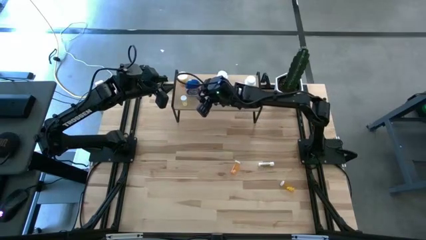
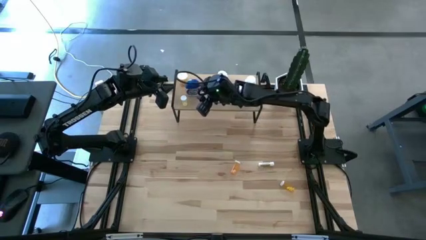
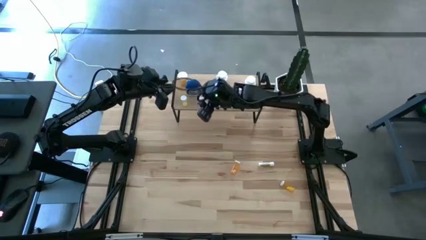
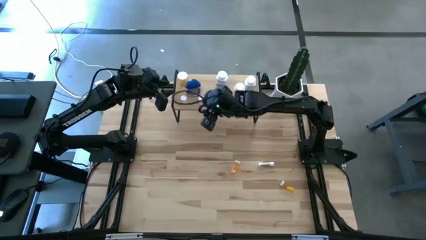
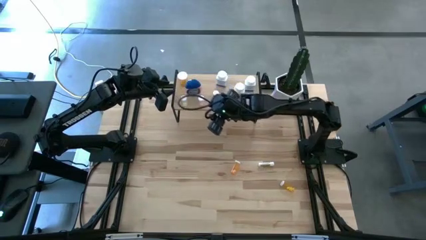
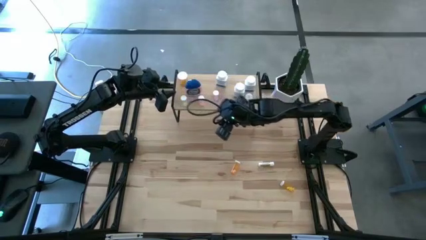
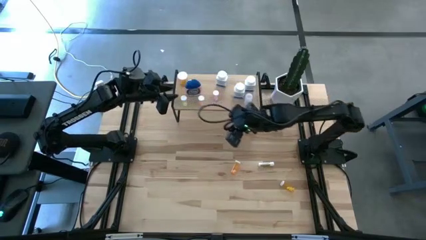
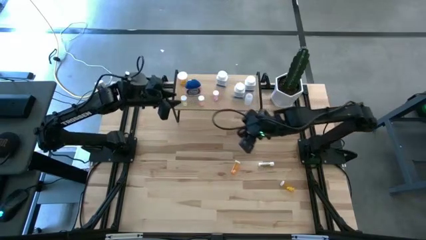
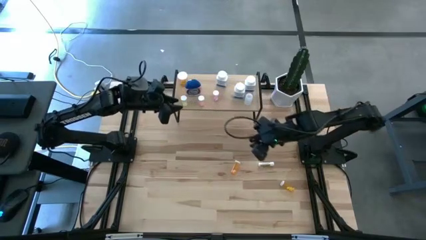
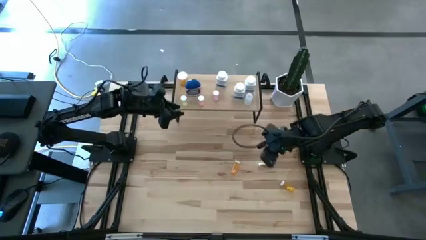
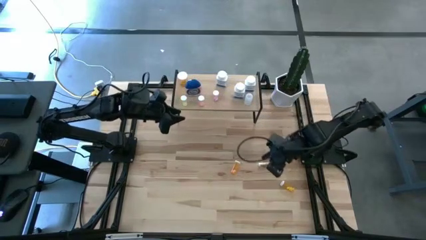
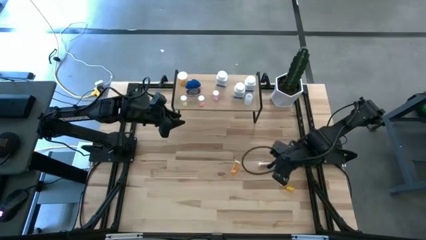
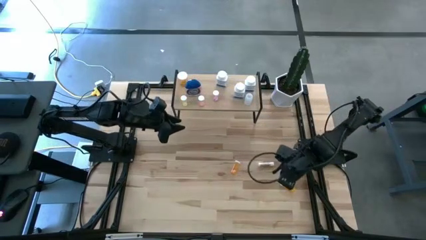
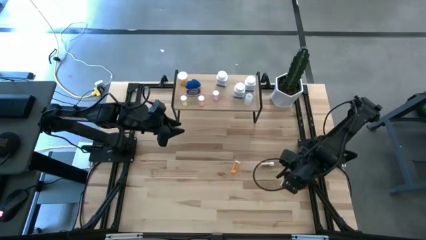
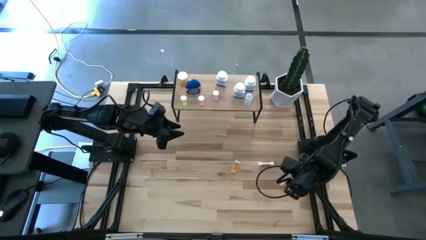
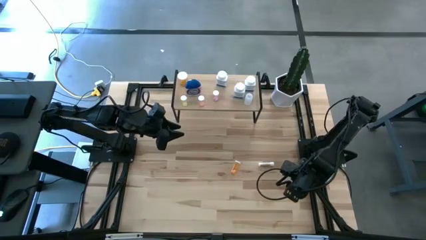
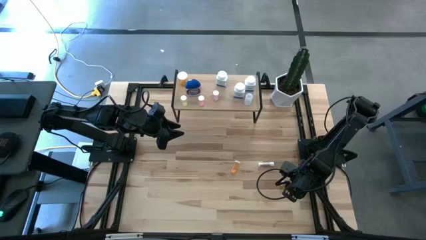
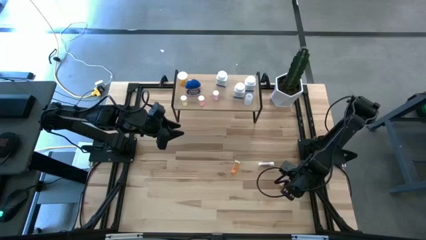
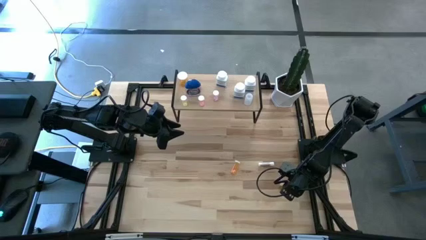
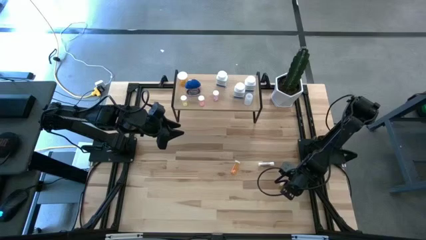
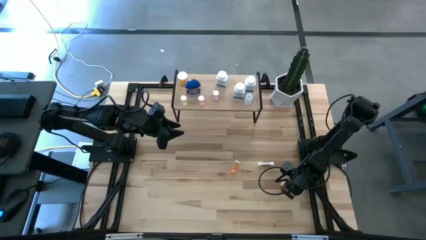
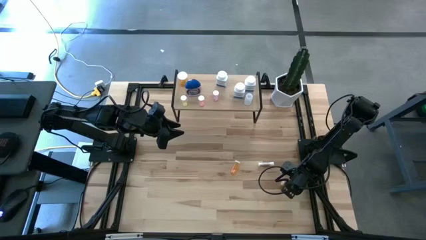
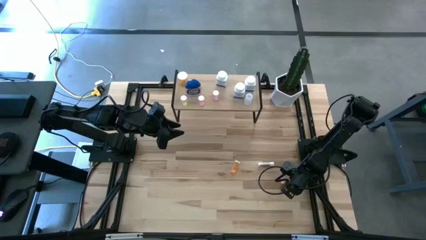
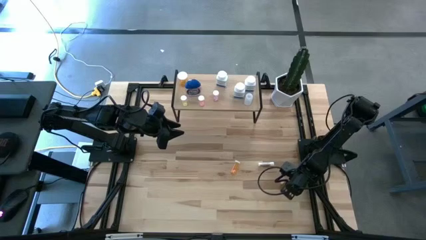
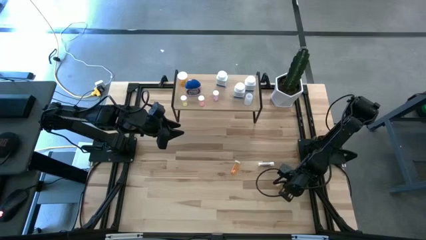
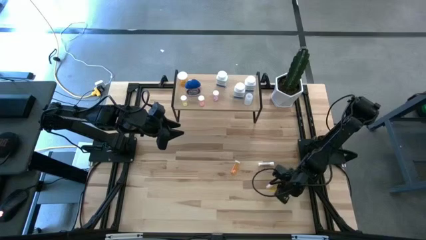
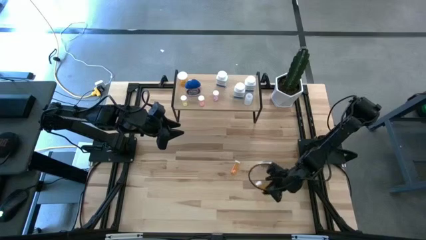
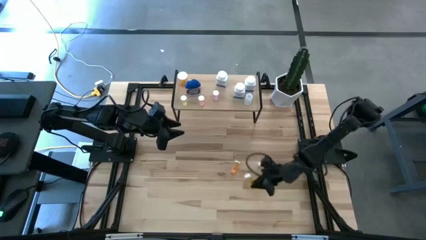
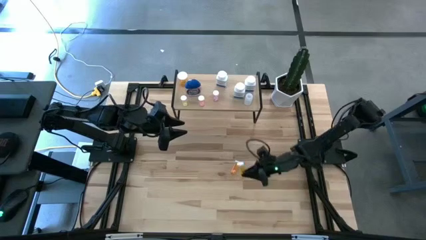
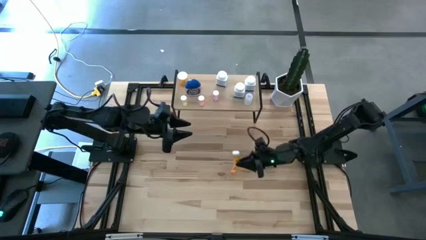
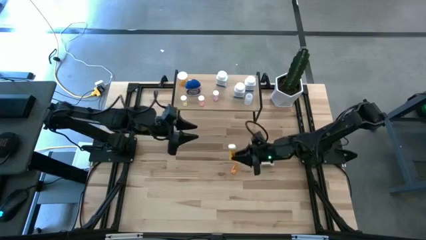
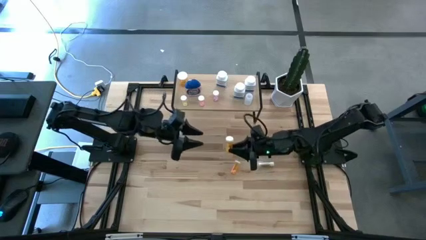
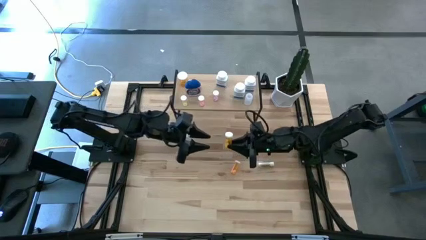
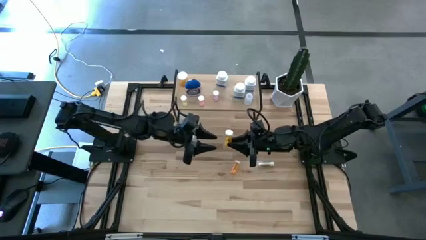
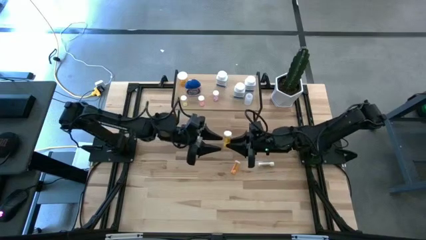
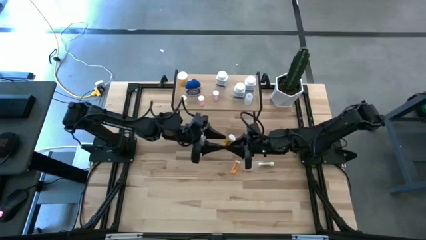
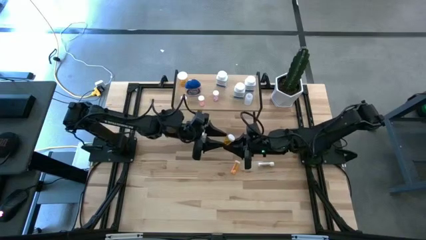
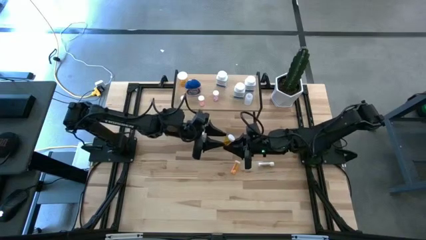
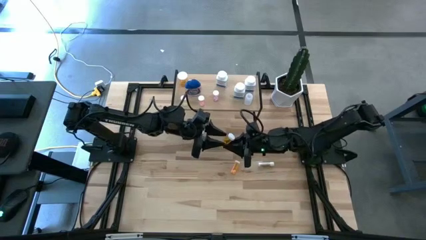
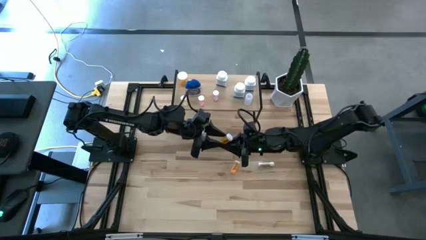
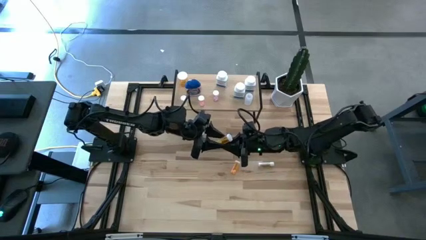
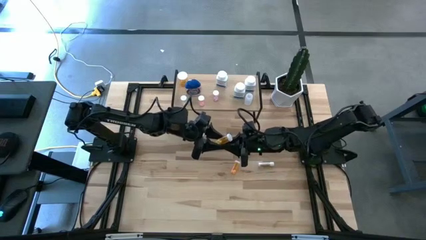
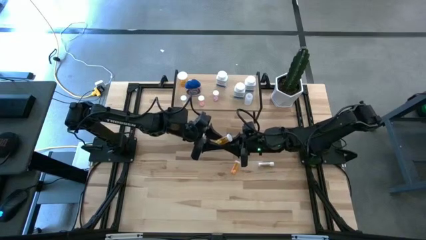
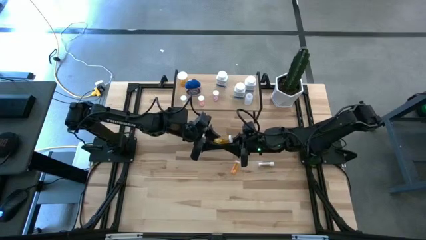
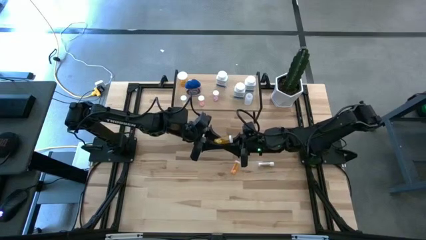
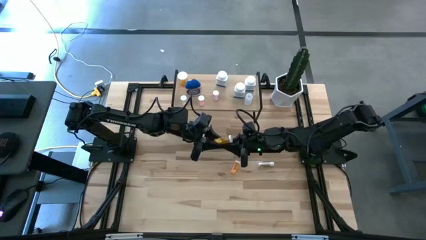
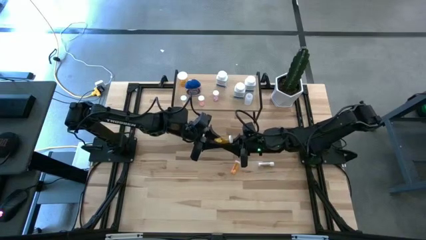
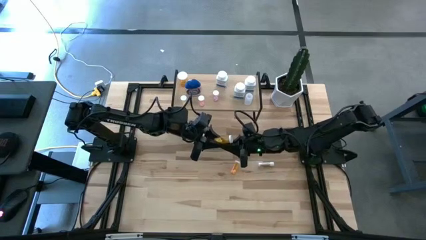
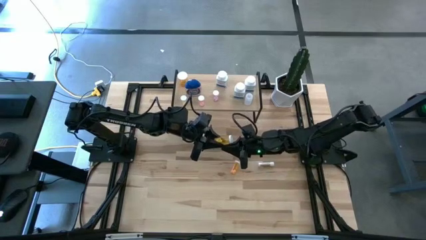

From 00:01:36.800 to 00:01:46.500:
Task: Pick and place medicine bottles onto shelf by color
Put the right small orange pill bottle on the shelf

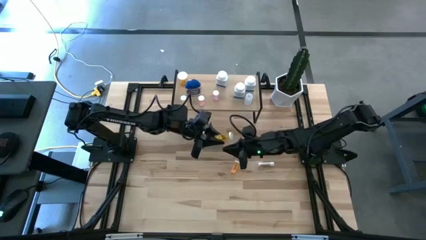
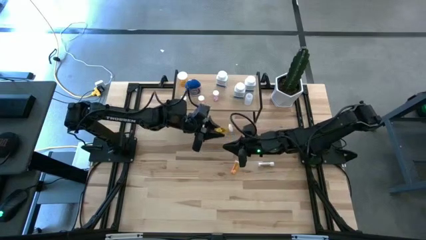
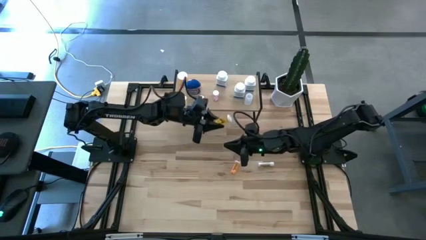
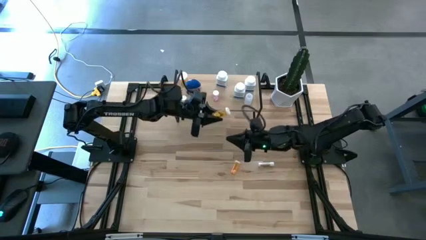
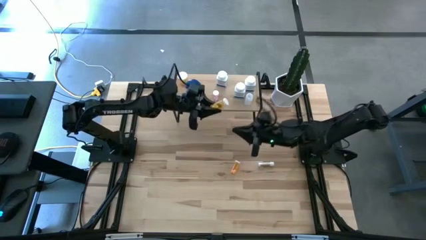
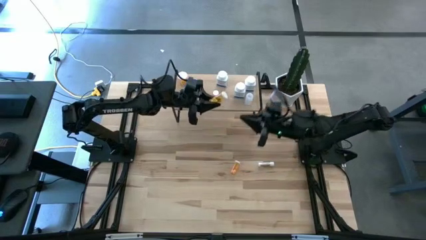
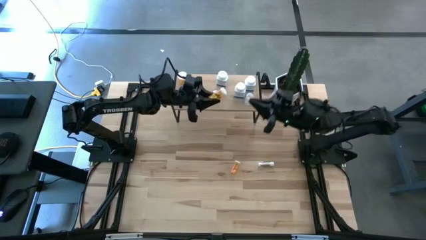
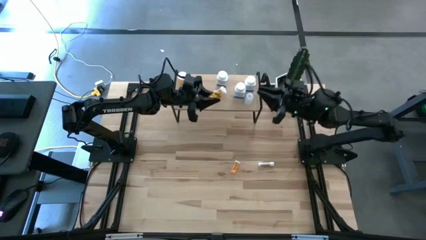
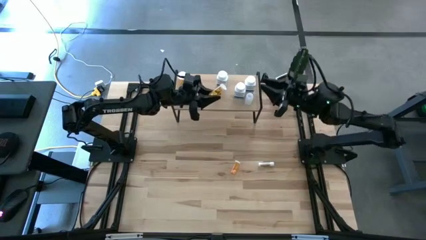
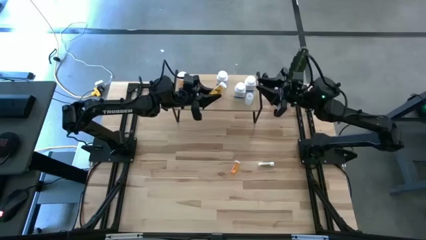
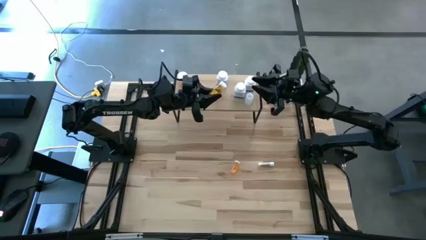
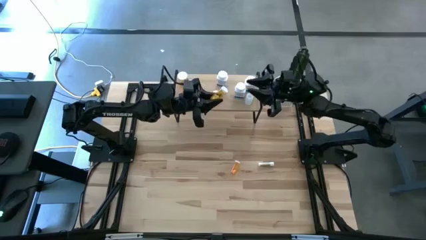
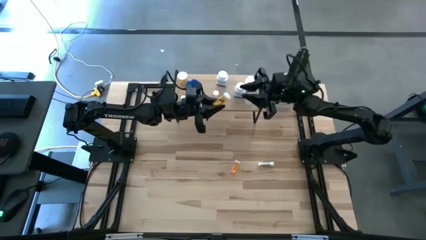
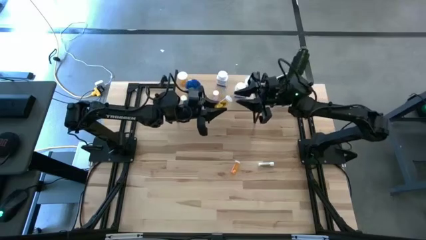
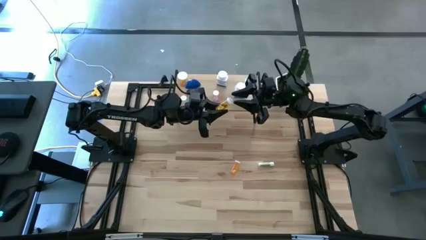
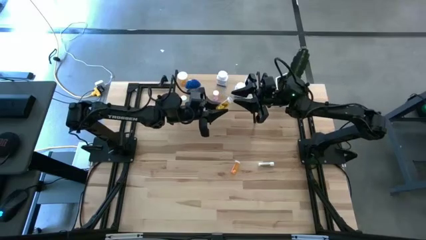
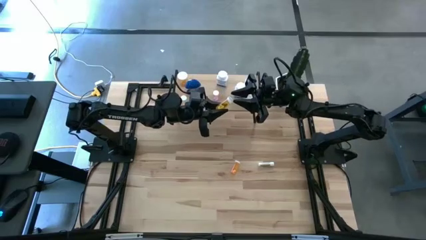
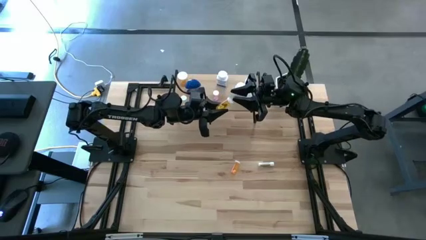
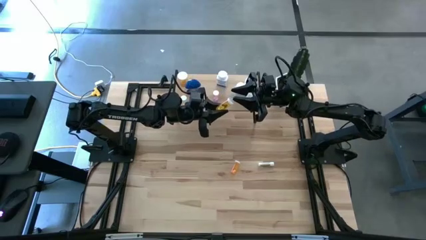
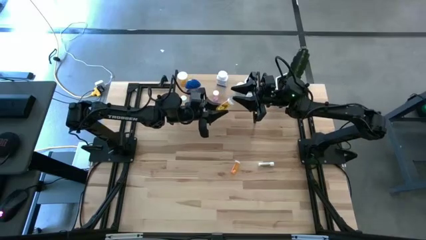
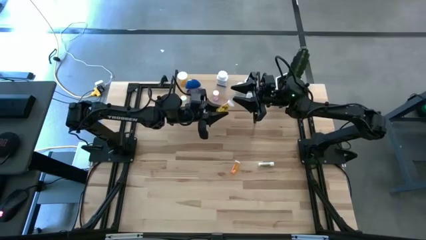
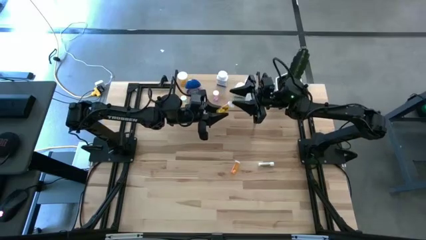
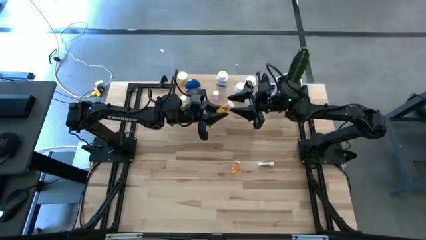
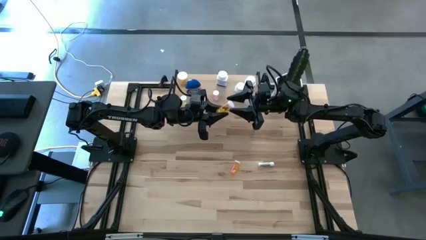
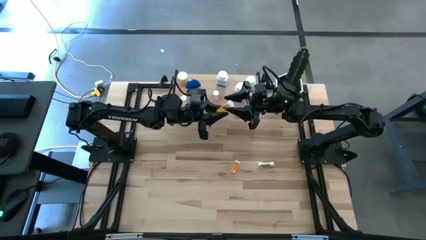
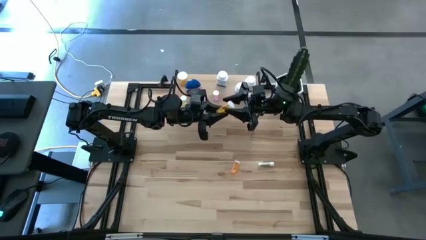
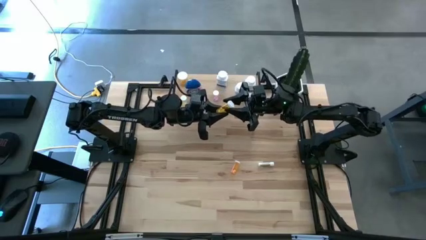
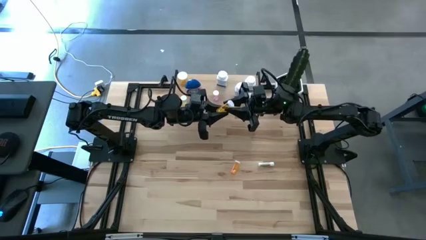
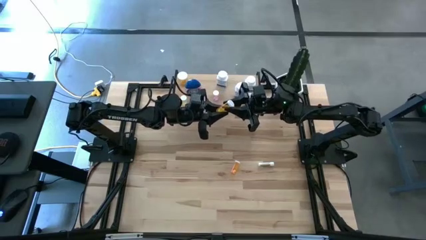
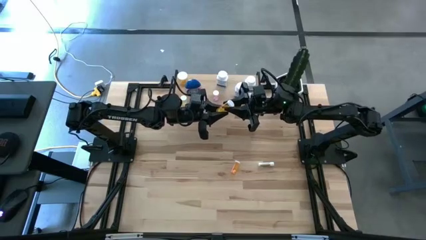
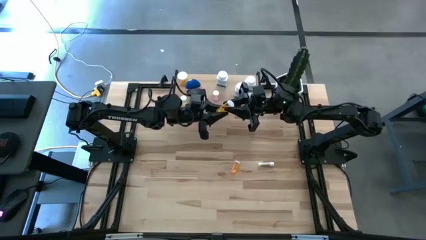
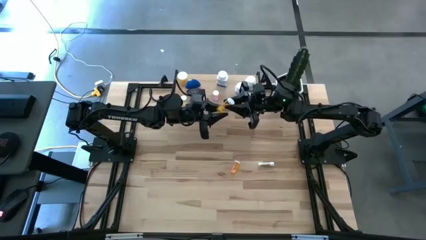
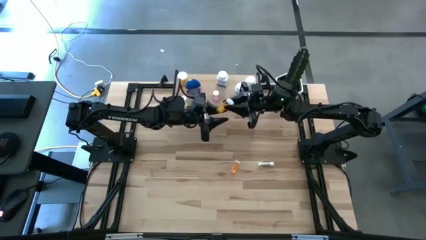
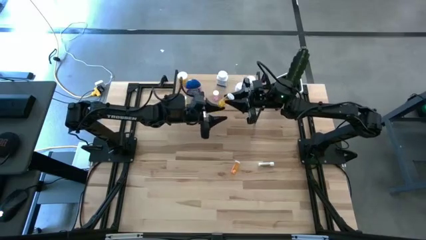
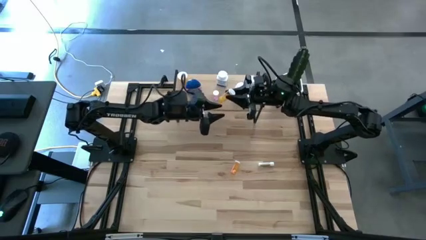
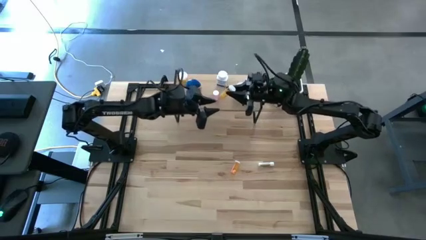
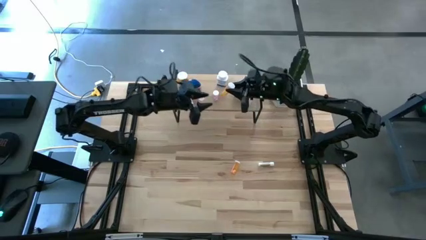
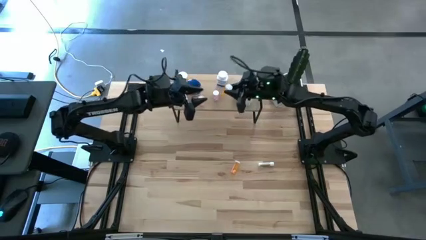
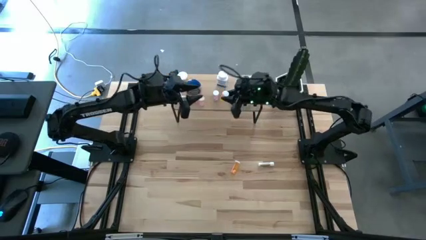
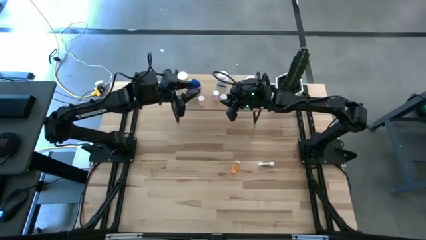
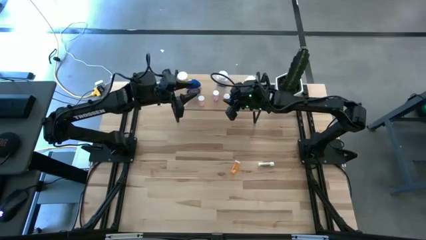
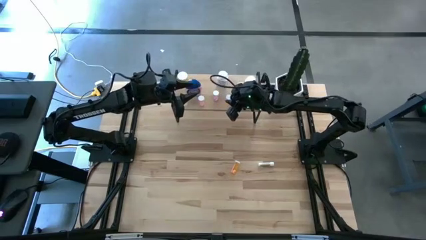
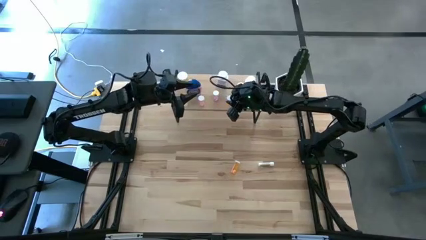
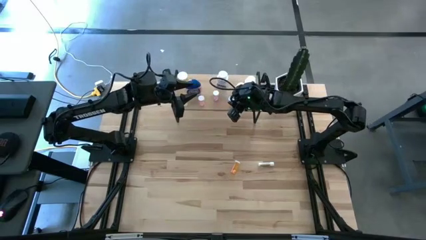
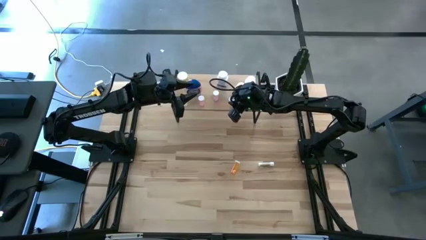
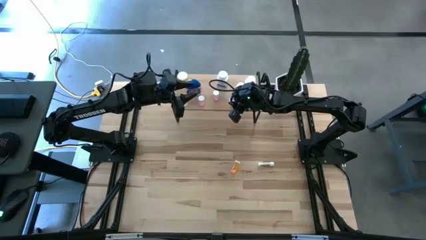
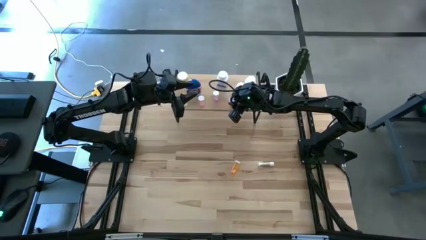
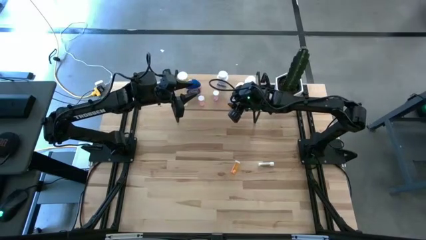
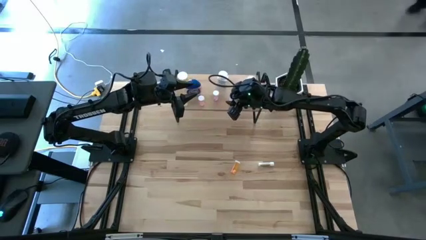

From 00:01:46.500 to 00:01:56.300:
Put the right small orange pill bottle on the shelf
